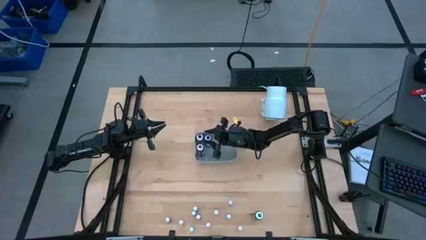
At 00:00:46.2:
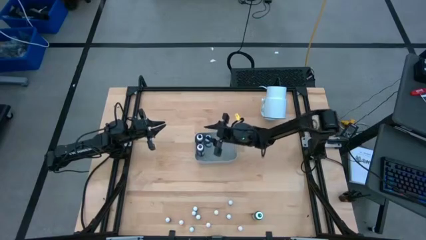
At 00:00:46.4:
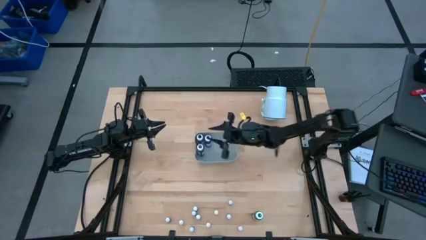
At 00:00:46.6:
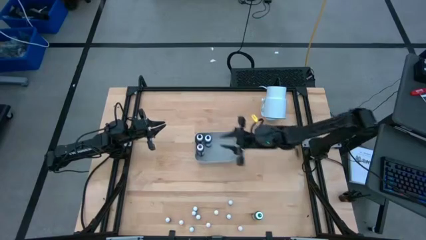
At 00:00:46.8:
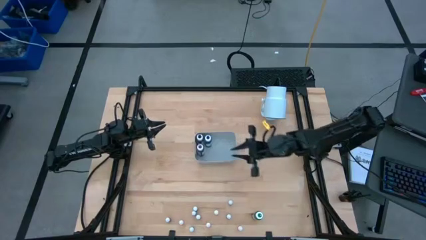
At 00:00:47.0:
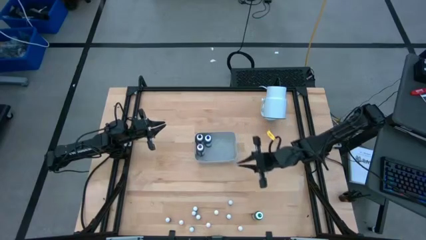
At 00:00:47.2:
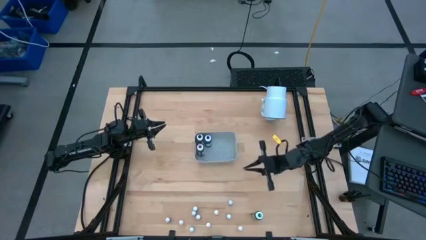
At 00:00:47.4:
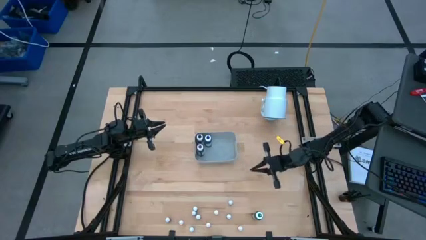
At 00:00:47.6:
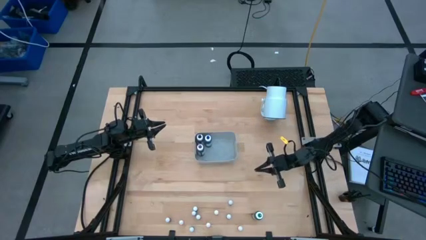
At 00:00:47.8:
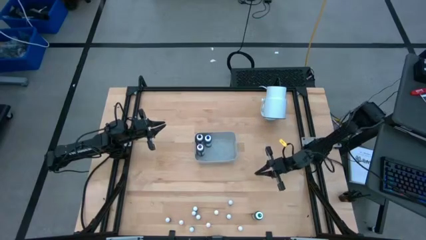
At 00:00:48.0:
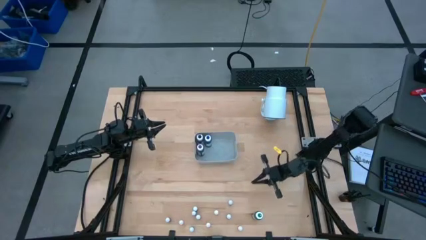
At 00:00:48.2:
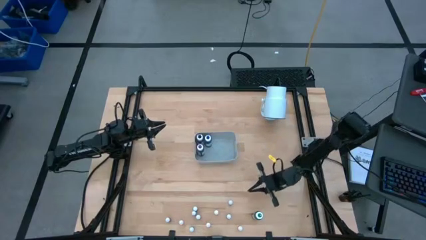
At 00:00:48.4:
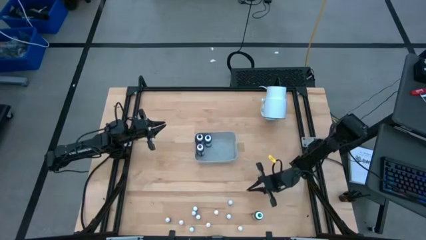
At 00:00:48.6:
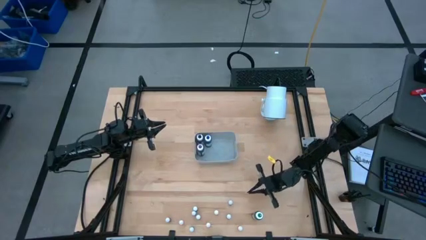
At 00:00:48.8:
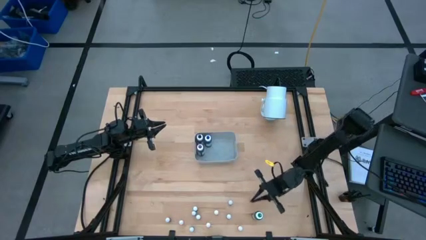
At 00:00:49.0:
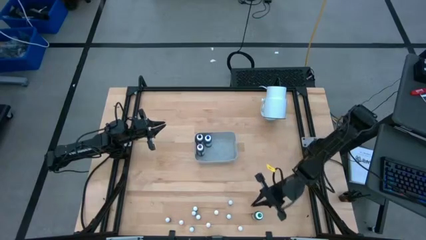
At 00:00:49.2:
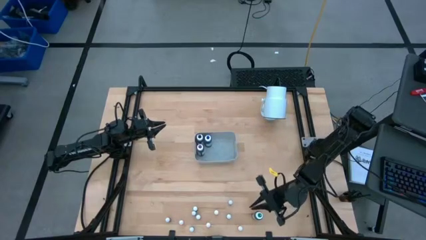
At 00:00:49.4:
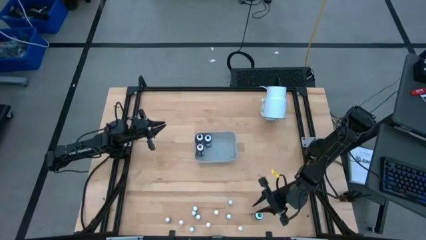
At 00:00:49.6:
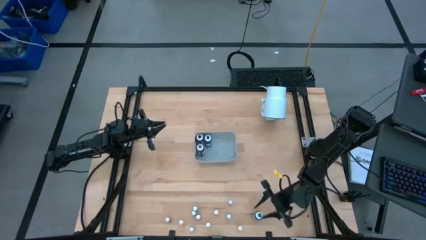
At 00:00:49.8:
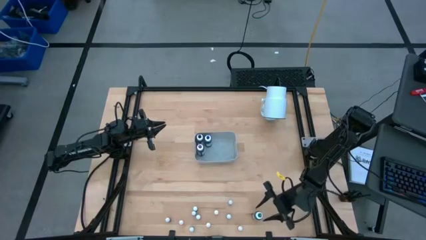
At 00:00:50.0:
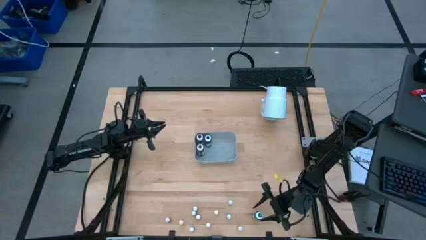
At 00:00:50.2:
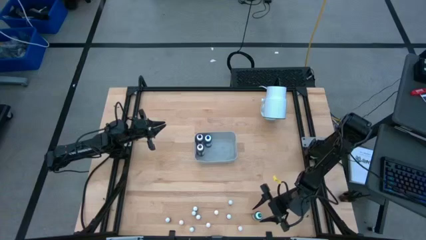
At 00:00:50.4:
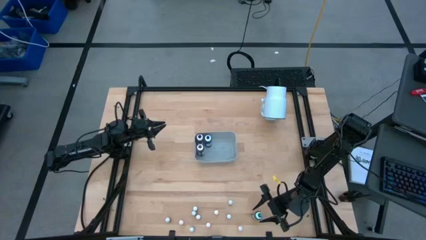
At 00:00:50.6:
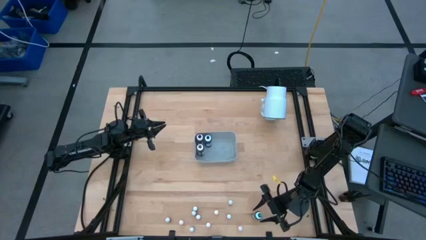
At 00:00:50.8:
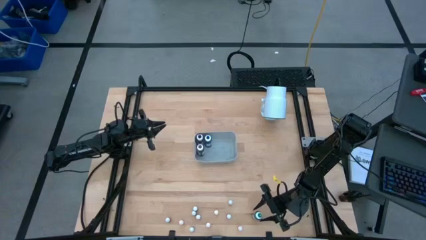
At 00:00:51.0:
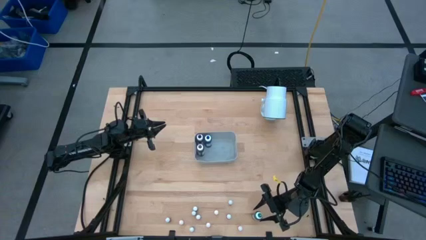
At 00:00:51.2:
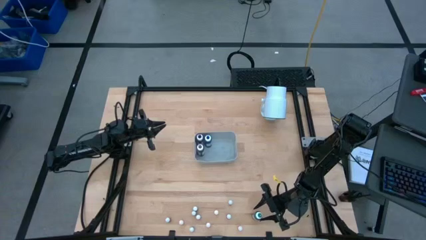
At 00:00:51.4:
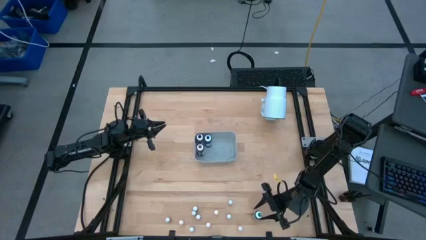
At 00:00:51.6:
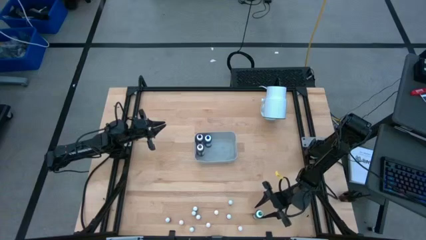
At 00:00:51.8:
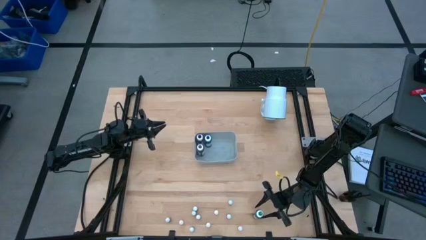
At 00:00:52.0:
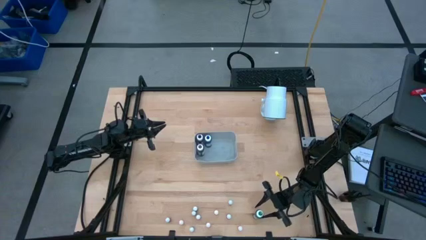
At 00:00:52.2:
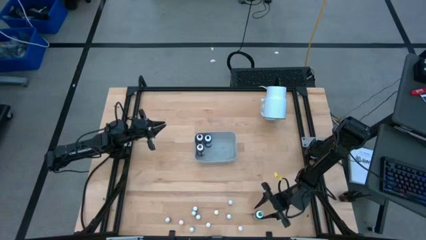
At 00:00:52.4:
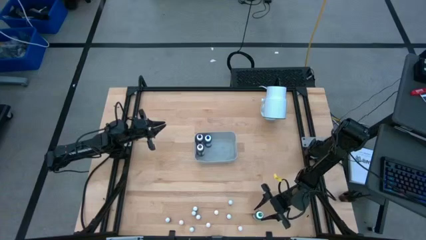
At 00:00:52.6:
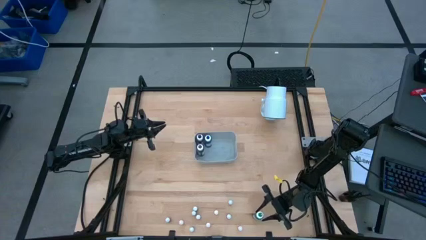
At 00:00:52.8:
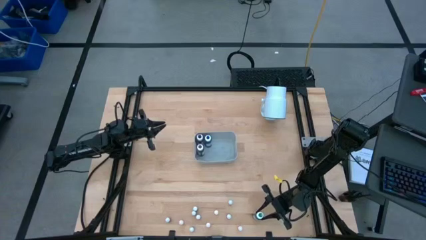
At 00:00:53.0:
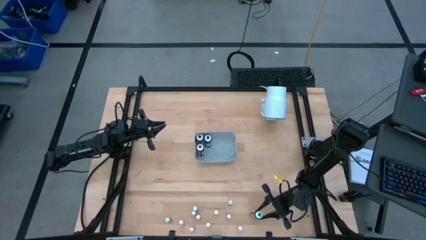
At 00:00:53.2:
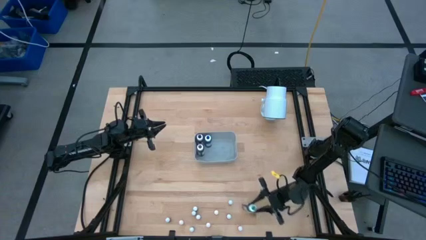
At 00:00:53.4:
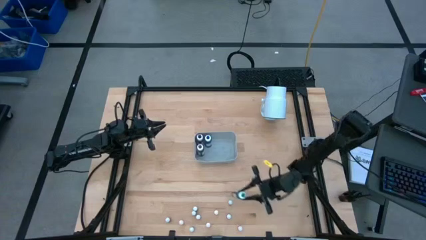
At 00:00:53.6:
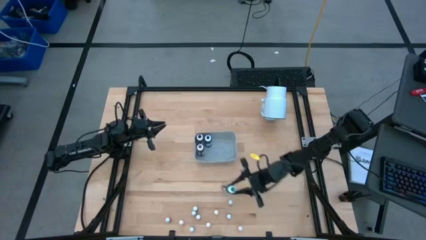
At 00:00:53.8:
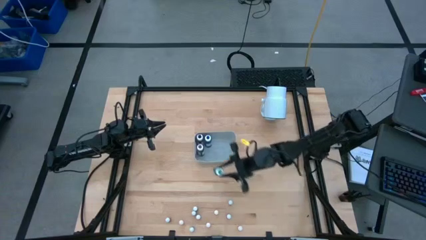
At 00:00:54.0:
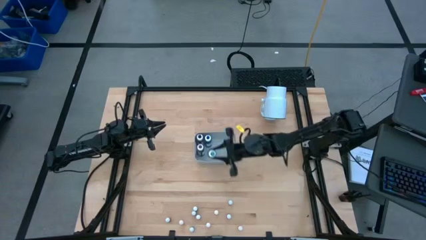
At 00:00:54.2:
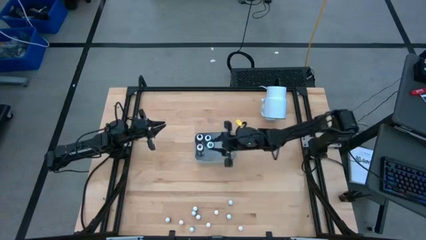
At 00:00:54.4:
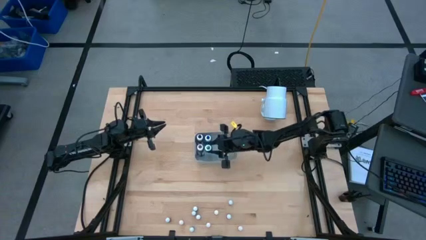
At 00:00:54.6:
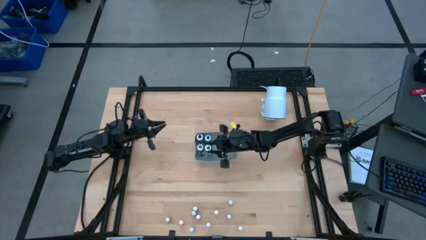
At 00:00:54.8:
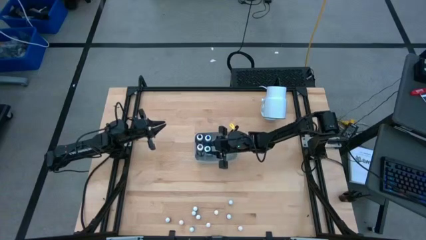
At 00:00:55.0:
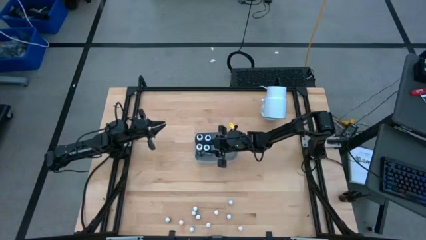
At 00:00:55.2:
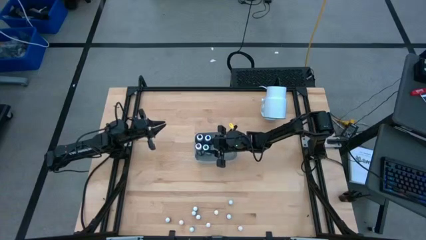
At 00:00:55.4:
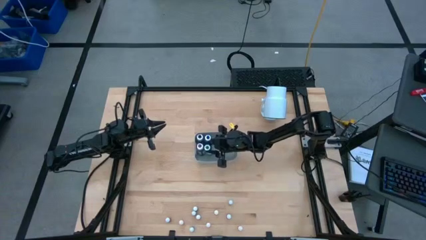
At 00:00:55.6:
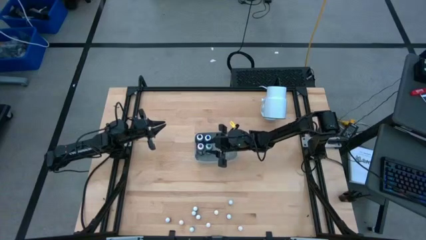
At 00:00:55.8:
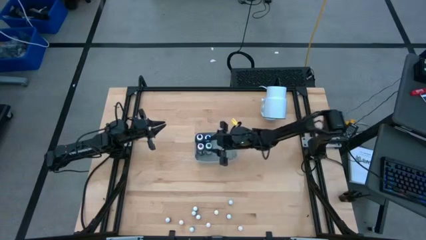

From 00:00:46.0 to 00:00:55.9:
Task: Pick & Place food coloring
Put the large green food coloring bottle into the white bin

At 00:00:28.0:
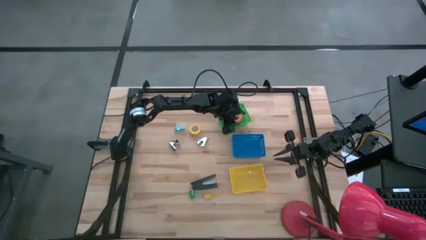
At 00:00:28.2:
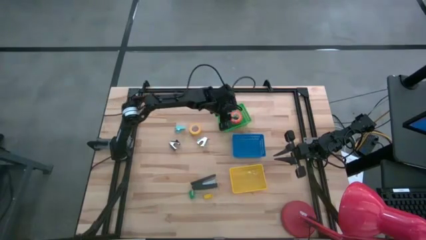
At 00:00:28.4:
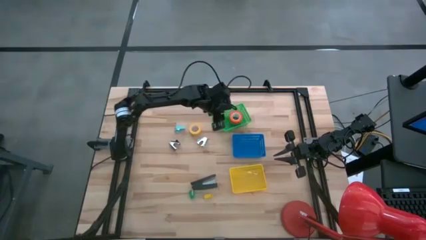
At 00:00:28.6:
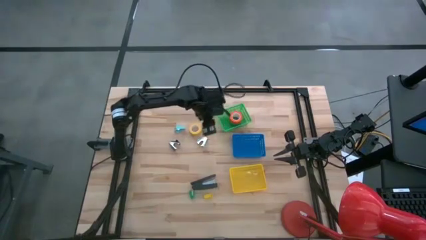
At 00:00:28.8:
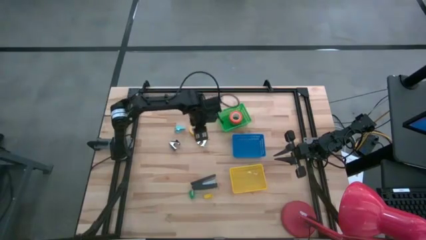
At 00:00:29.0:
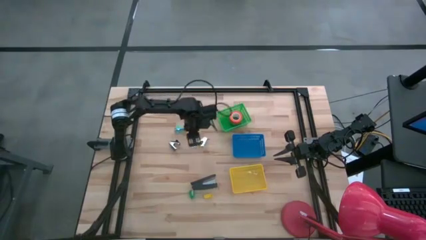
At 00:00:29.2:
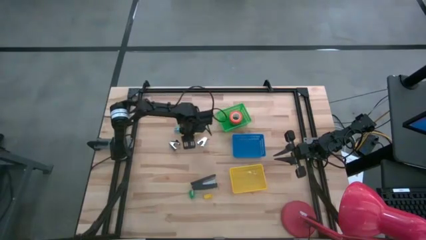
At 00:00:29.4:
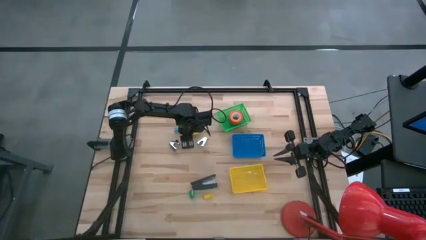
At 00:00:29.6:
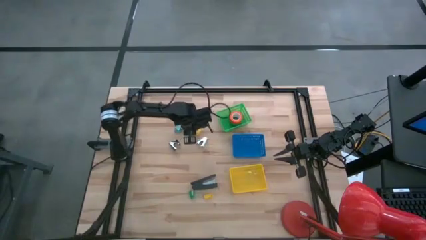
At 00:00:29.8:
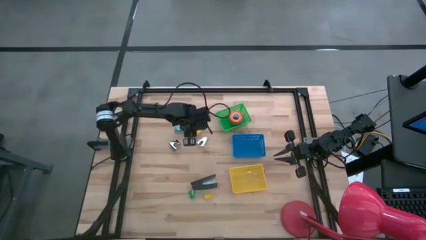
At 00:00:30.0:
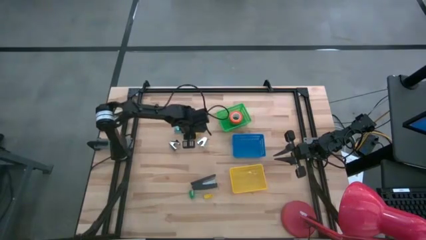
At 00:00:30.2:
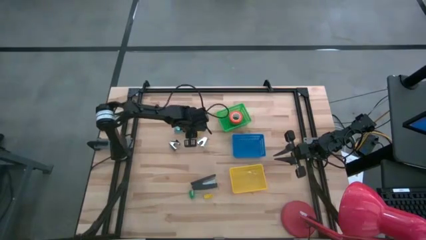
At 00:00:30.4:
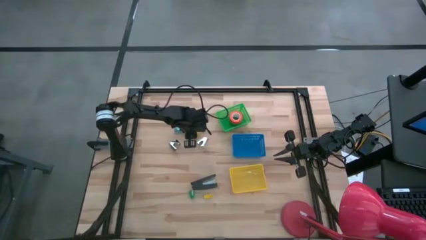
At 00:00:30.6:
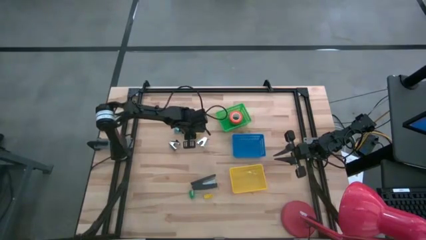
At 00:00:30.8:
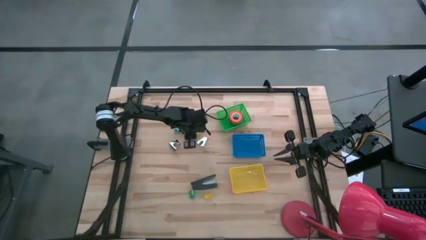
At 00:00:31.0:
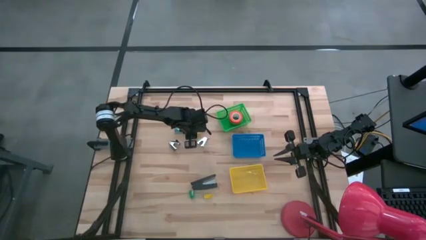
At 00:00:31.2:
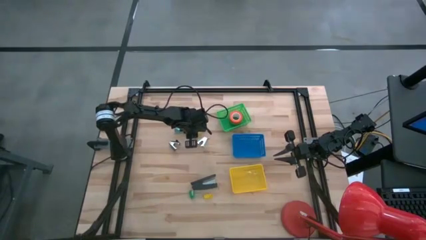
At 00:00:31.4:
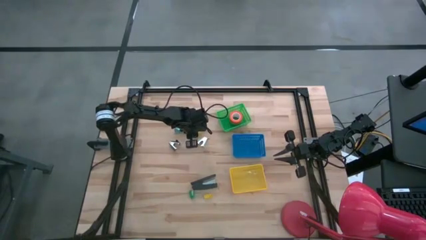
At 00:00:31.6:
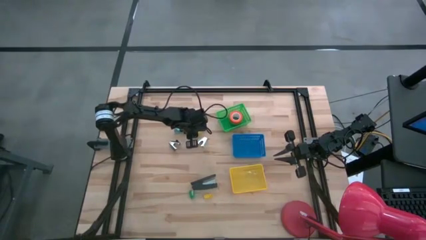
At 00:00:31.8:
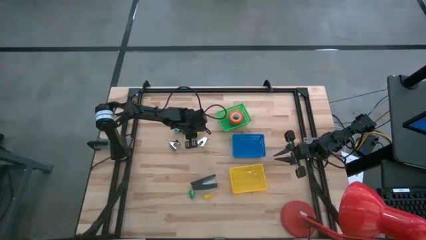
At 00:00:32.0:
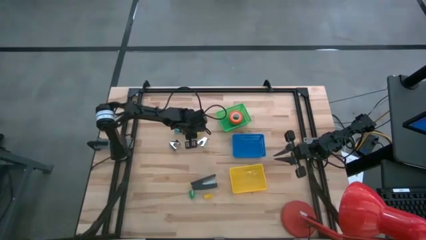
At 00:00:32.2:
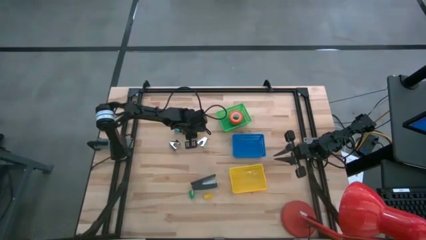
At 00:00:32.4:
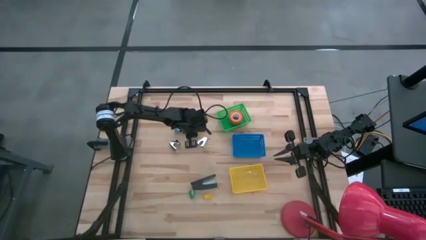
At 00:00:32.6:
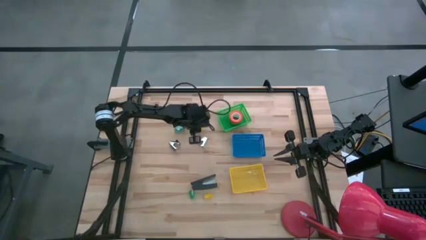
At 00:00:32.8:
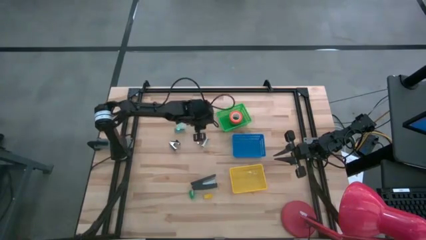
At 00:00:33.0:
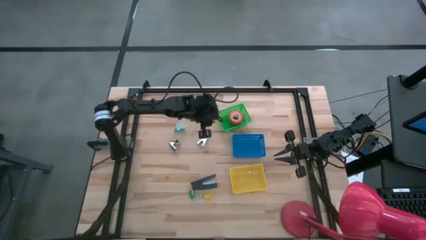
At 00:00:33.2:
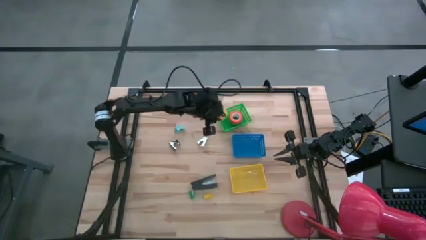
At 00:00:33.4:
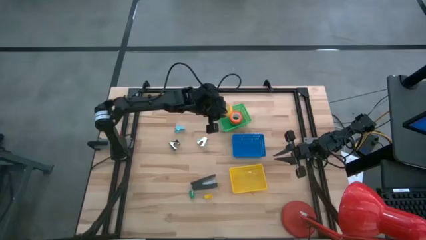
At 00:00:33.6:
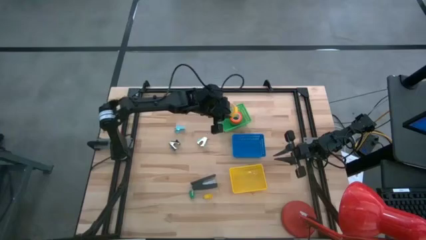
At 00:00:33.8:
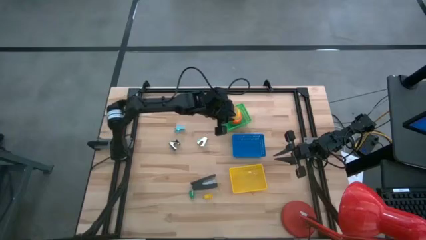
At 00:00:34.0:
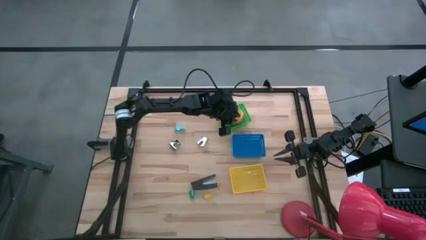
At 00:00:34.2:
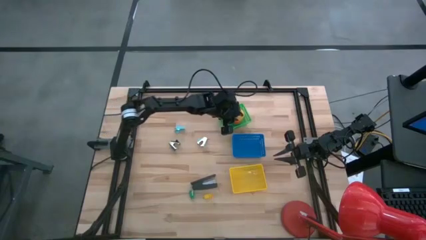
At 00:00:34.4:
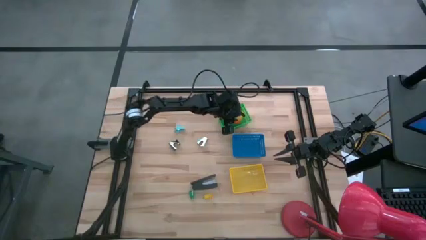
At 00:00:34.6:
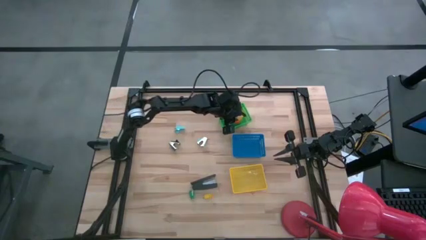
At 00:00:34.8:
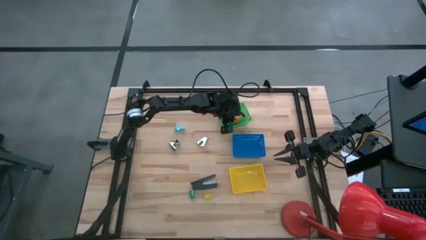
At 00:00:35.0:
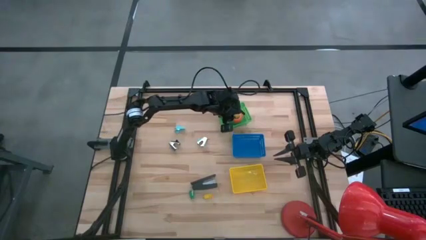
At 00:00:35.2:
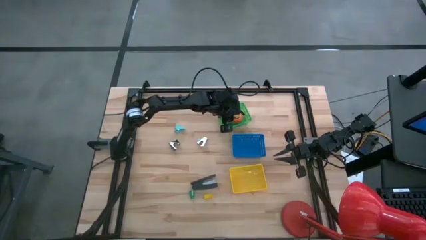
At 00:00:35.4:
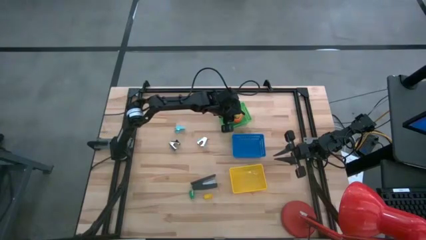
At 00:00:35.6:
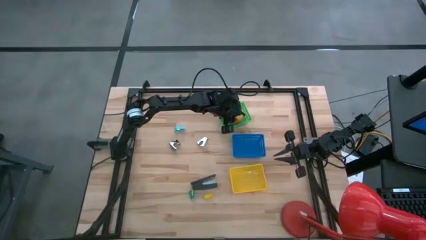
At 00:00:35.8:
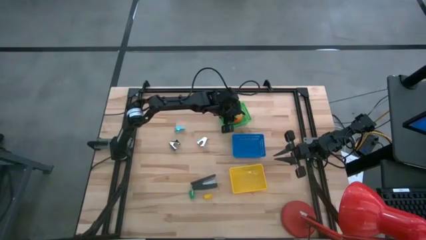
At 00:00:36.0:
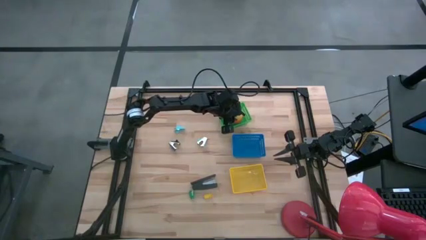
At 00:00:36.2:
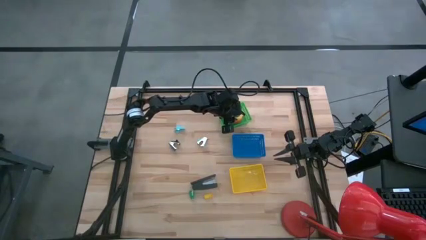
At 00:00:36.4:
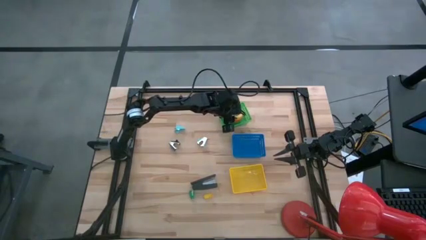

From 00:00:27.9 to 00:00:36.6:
Task: Pick and place Stapler, Stapler remover, tape
Put the yellow tape into the orange bin
